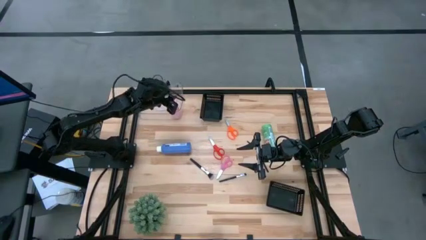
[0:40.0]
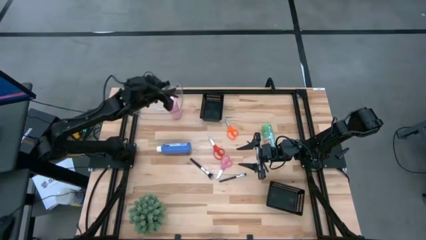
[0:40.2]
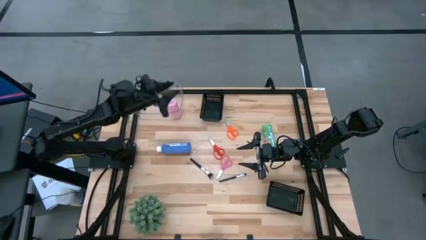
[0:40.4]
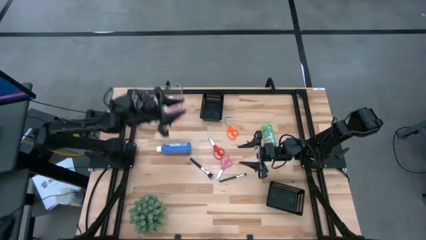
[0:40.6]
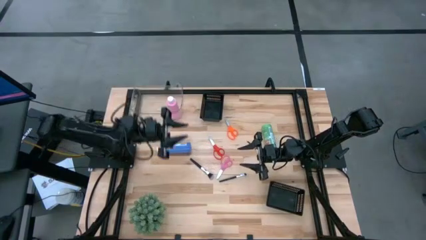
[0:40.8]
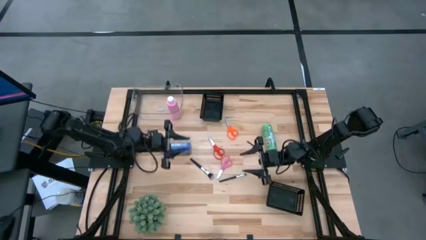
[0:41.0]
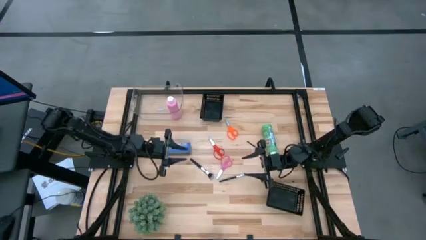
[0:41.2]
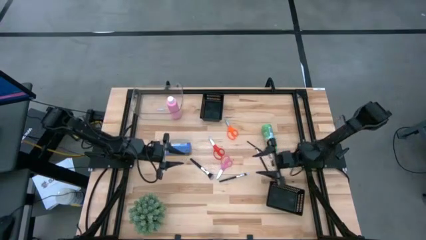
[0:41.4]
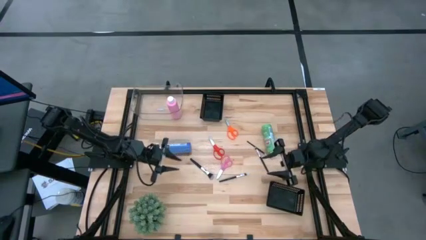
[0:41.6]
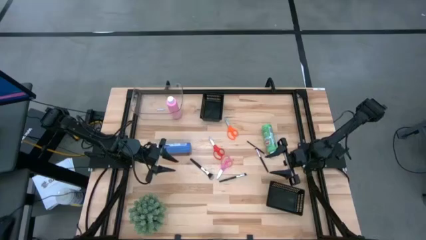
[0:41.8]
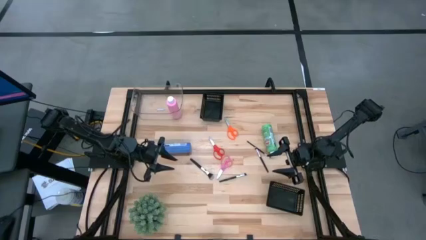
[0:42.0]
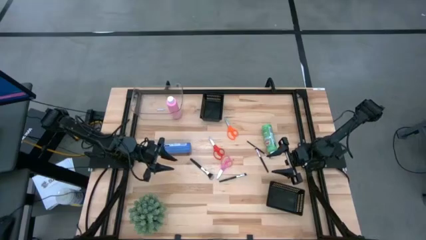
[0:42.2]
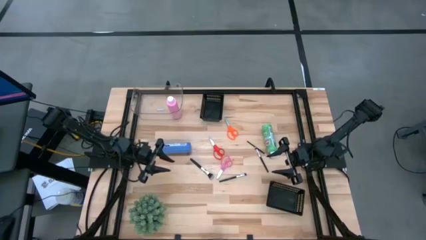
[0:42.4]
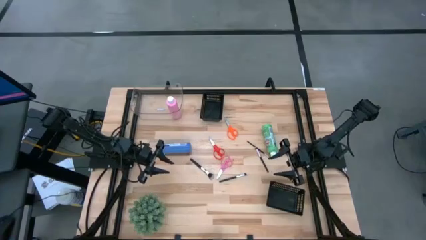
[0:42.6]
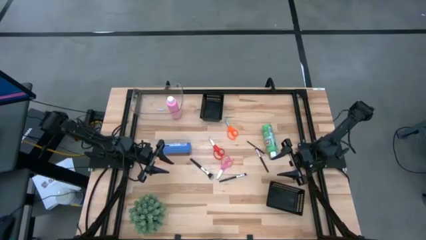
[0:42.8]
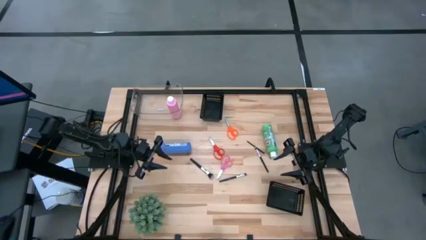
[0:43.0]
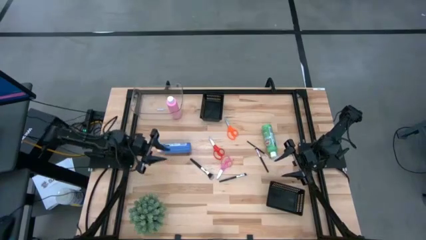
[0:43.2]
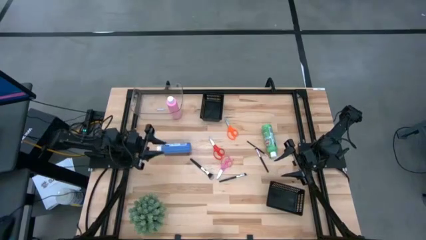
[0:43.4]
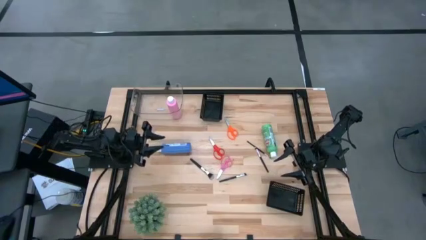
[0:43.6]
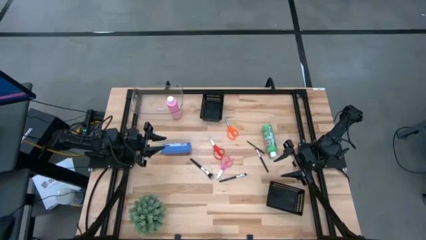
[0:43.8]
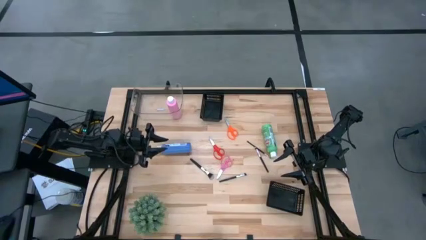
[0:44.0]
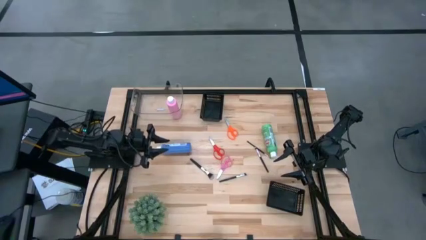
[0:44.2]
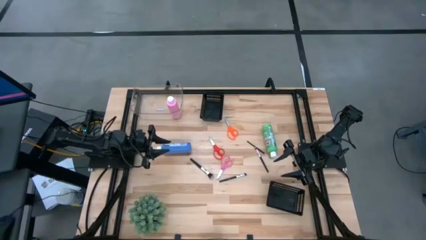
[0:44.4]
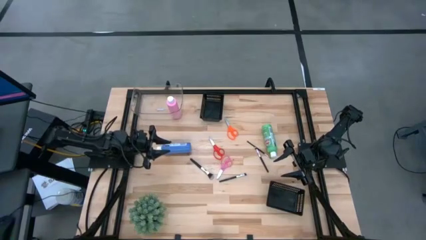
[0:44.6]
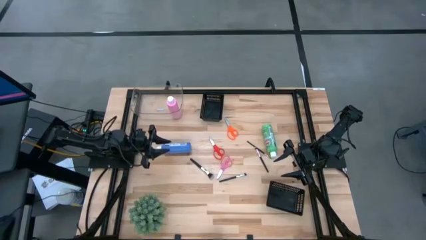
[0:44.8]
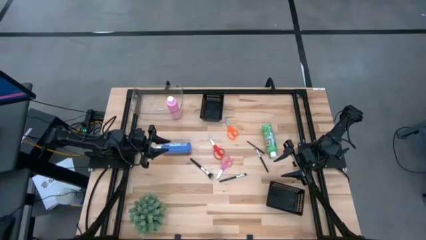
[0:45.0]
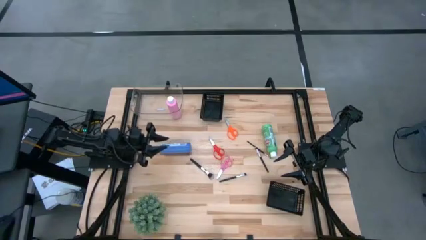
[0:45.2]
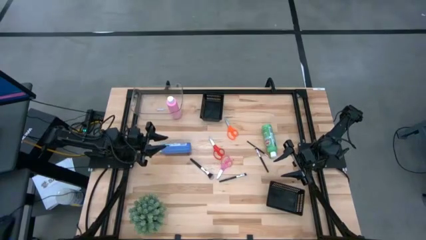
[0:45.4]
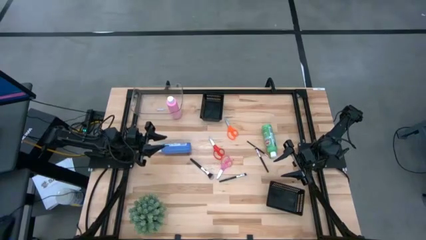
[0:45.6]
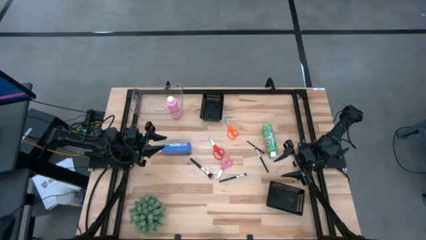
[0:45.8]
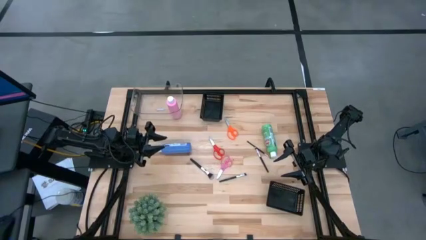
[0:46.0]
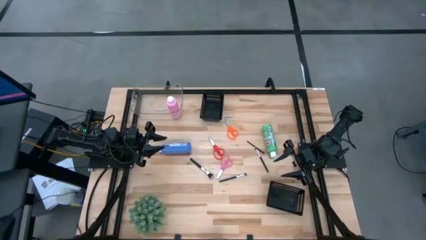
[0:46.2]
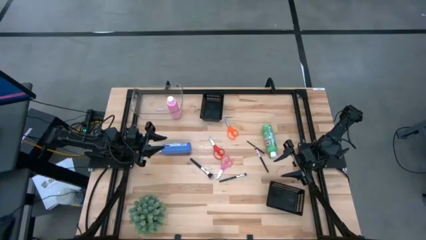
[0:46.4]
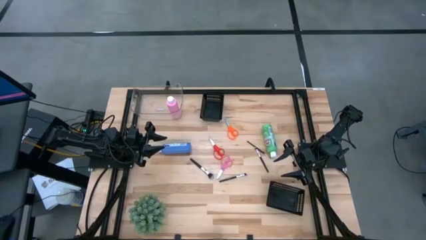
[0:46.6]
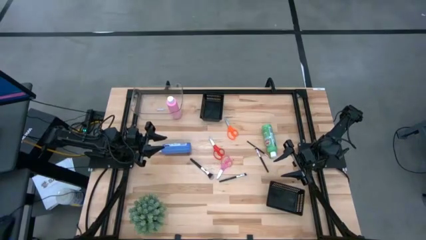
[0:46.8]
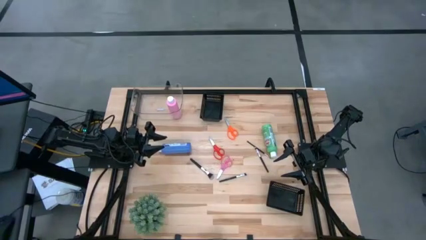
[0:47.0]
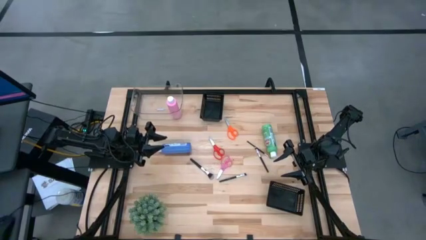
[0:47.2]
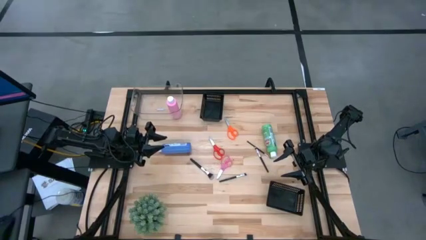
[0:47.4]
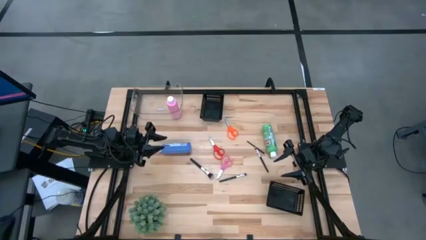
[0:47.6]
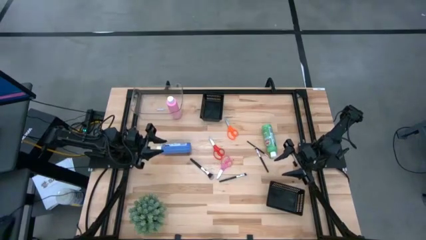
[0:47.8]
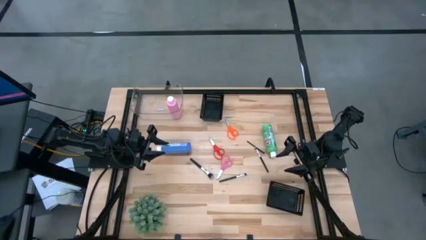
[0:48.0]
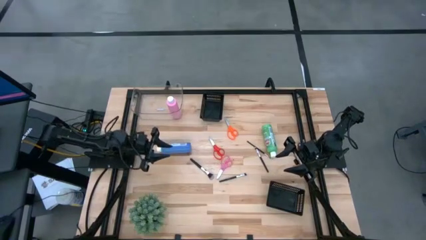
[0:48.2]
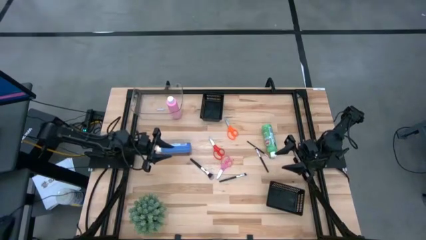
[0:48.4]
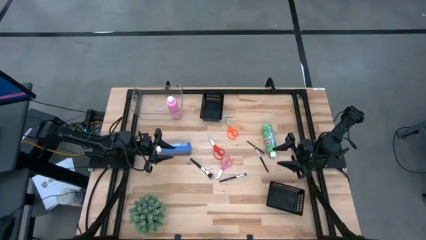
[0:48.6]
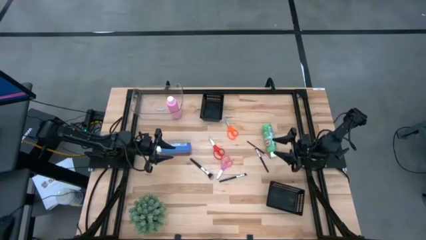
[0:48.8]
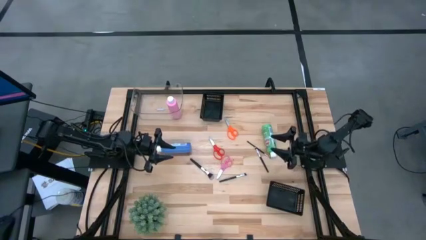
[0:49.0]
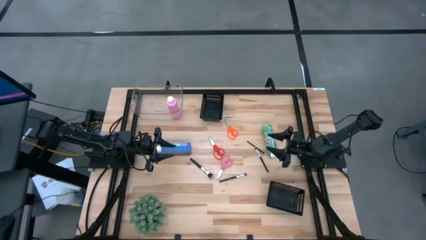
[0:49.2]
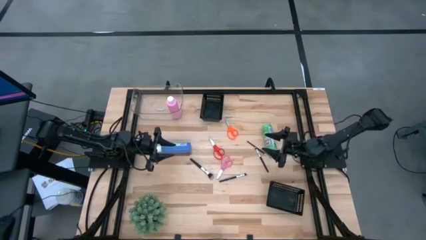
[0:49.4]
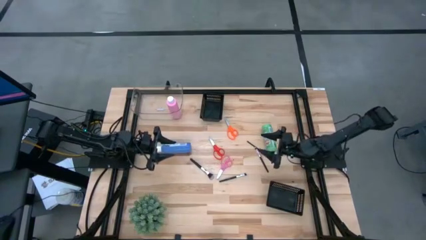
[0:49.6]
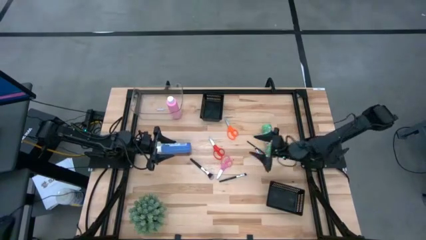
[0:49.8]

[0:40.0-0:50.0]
Task: Pick & Place Paint Supplies
Put the purple paint bottle into the transparent bin

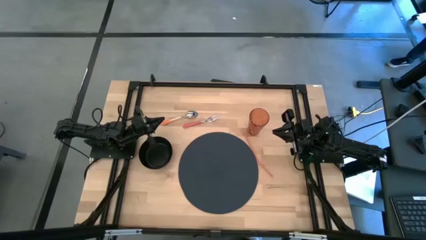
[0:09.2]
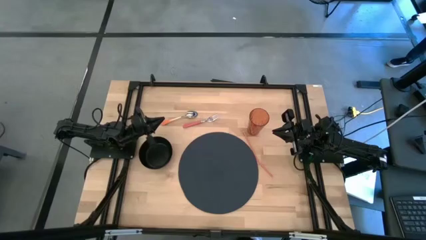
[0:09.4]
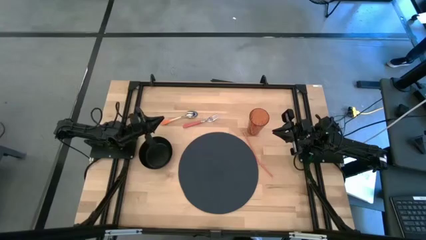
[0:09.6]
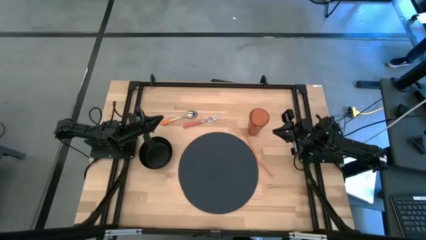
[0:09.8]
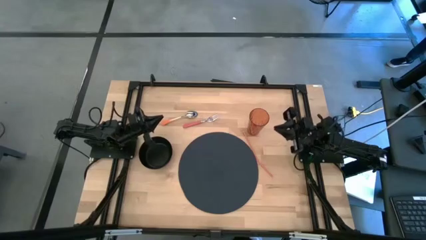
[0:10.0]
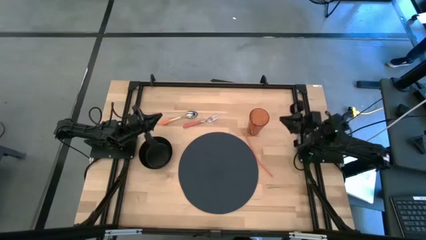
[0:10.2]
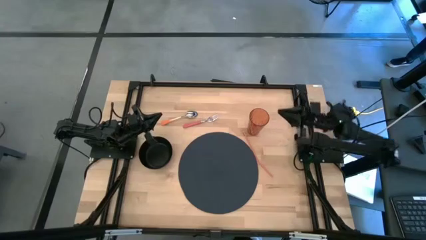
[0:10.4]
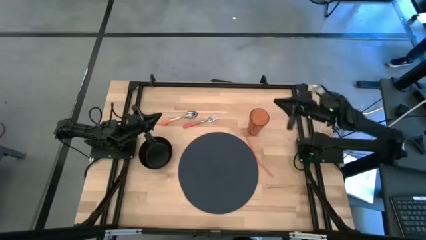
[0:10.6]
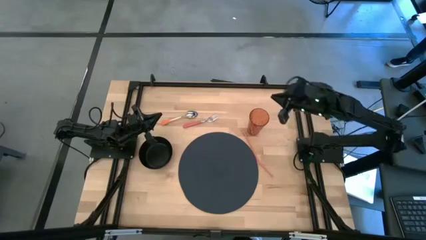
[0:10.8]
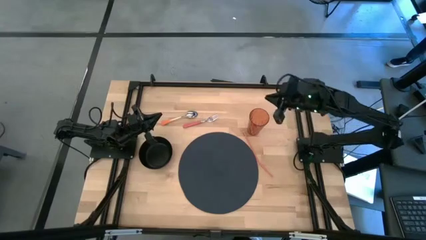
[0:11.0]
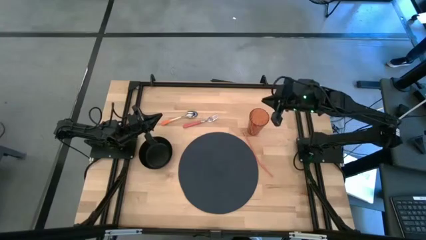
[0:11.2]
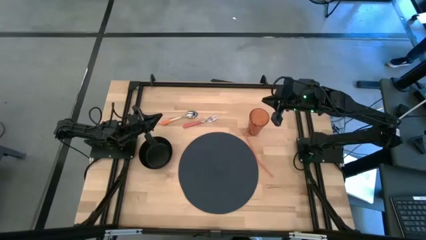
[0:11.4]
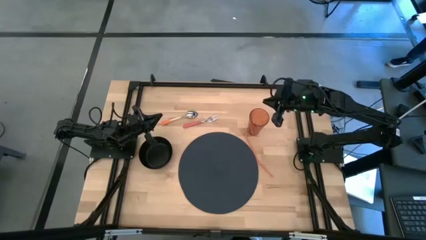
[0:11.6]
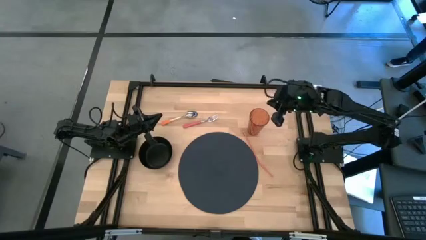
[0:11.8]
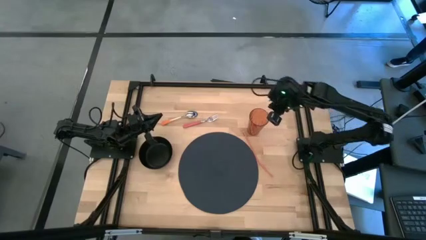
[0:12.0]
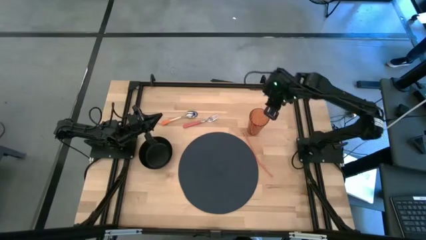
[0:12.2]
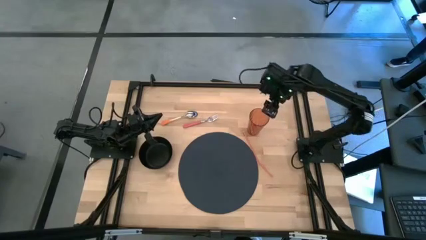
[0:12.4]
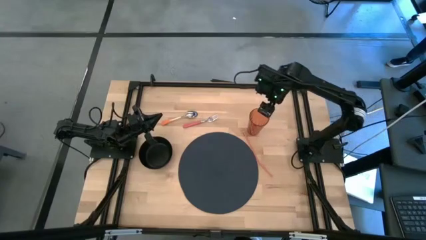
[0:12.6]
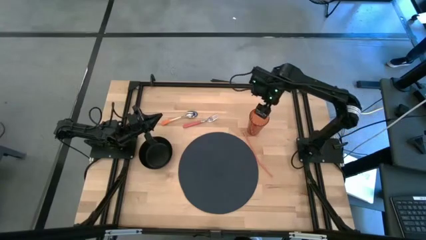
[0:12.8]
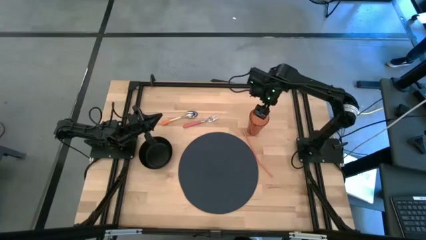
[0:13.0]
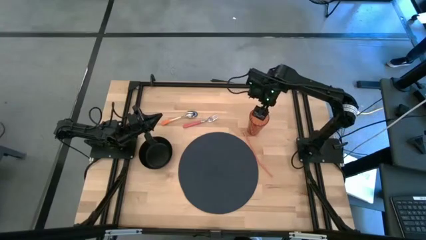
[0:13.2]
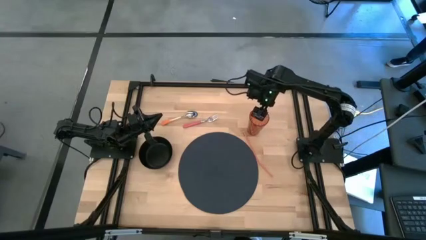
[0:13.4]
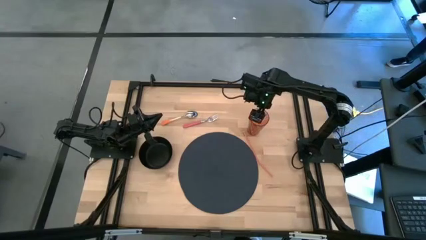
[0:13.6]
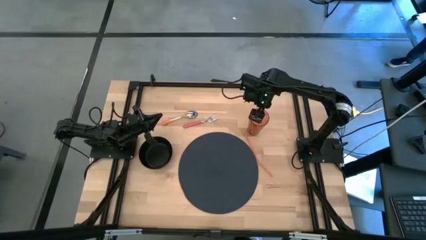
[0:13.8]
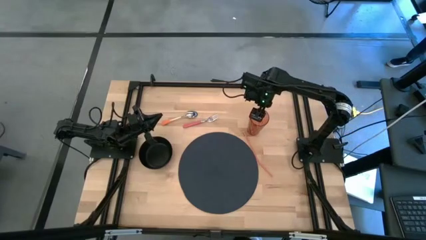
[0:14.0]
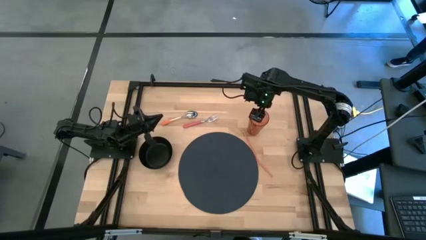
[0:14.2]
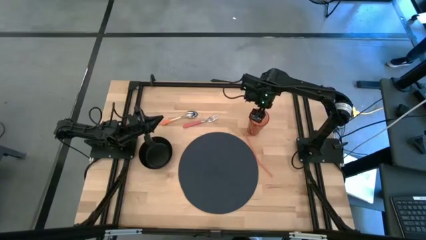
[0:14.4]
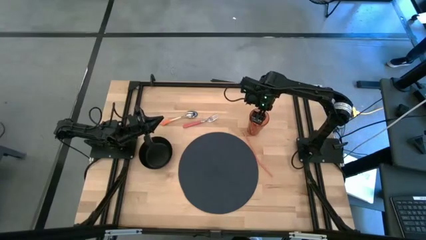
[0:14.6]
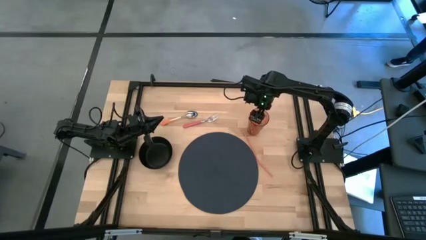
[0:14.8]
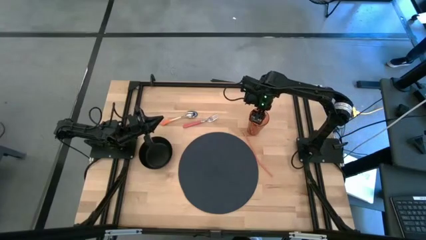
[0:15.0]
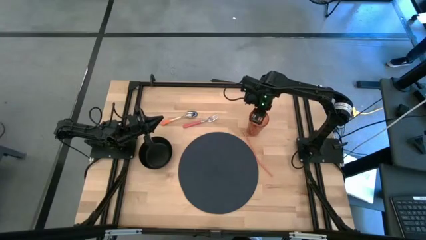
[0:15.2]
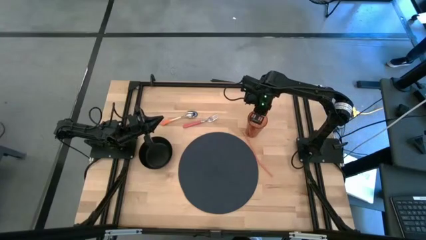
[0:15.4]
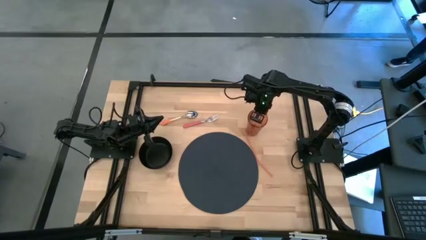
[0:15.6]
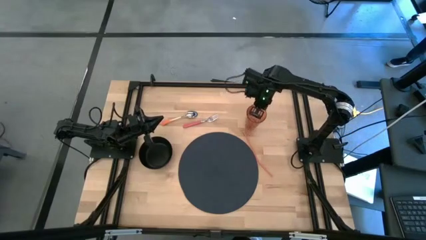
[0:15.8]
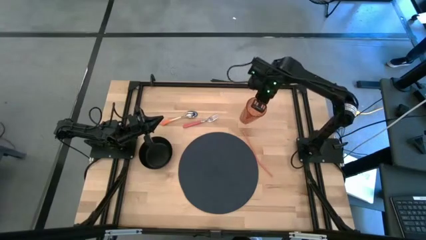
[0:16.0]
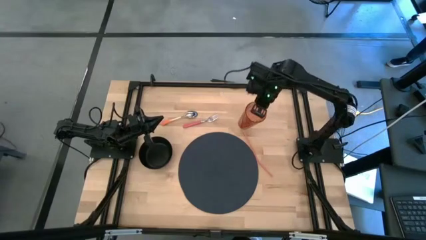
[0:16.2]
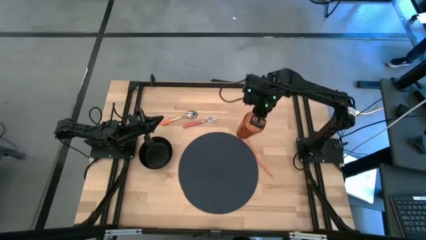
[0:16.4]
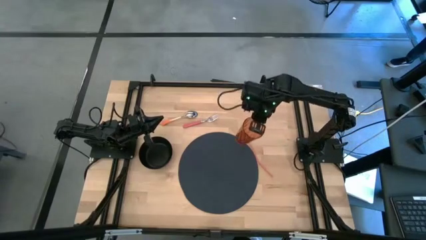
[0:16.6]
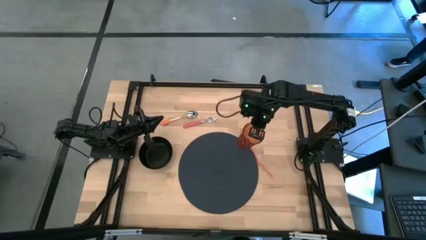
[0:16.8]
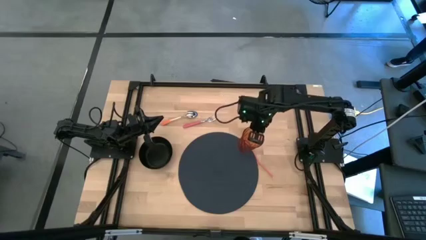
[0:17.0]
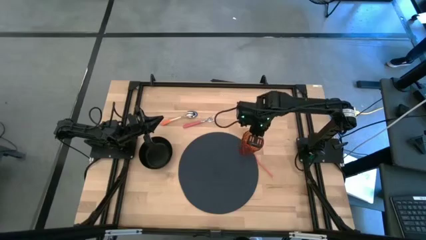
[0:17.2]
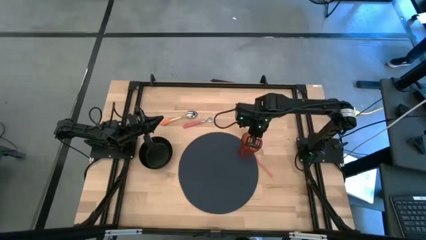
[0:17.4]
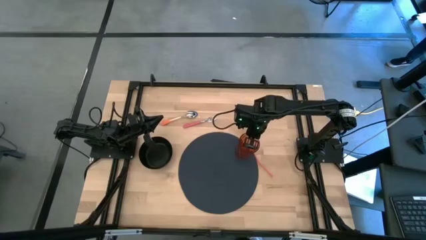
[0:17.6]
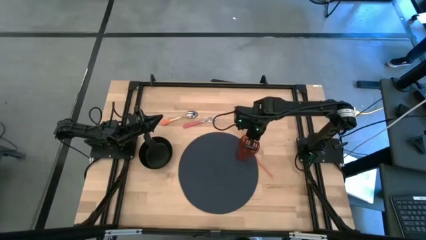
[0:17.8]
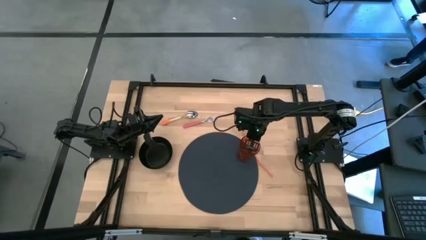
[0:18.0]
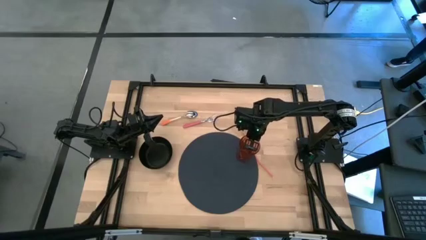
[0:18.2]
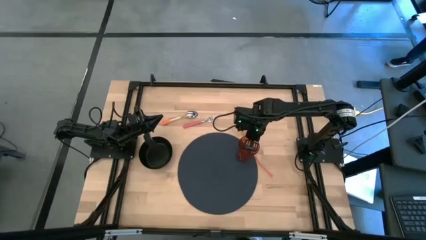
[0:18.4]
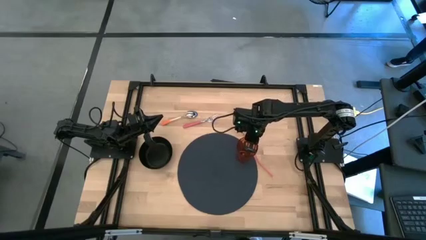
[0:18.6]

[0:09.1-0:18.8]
Task: Pick & Place Utensil
Put the brown cup on the dark blue mat
